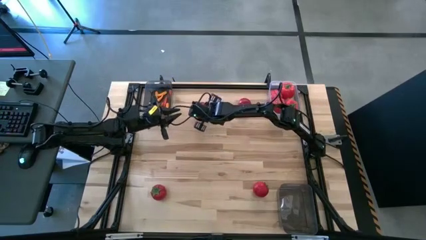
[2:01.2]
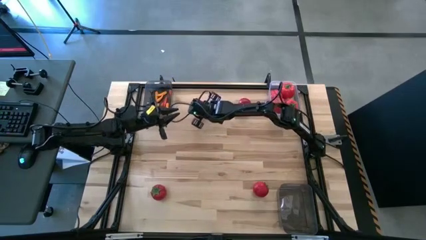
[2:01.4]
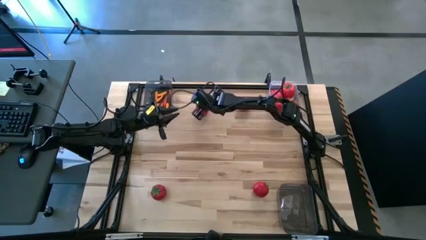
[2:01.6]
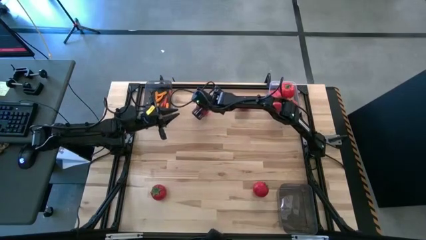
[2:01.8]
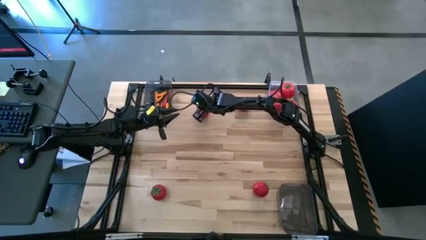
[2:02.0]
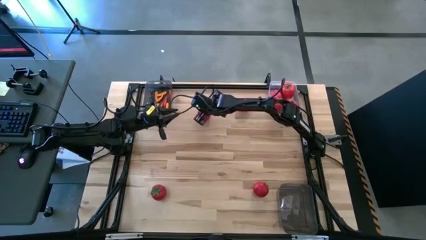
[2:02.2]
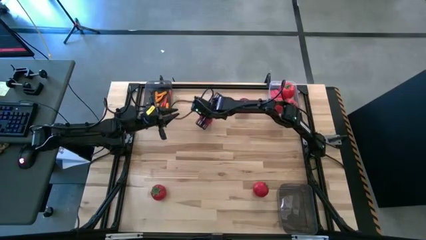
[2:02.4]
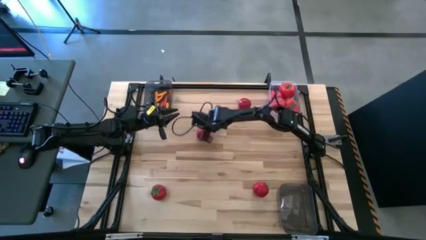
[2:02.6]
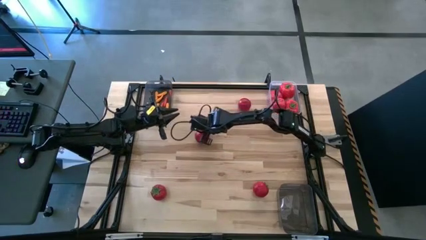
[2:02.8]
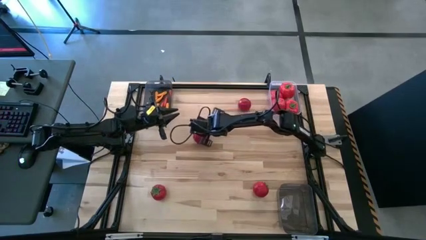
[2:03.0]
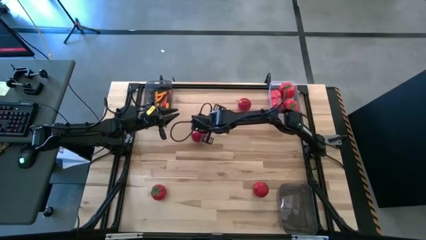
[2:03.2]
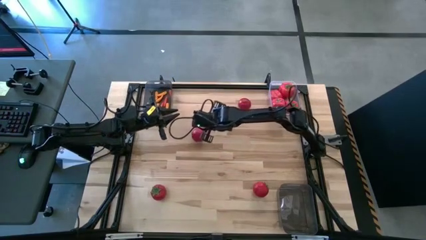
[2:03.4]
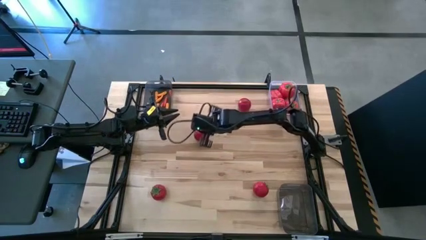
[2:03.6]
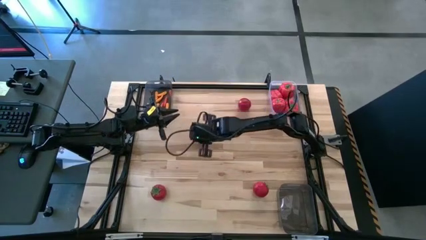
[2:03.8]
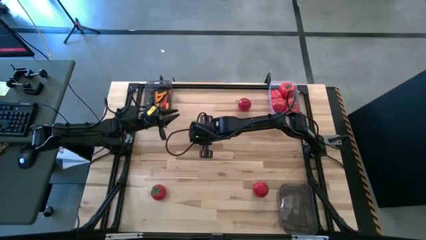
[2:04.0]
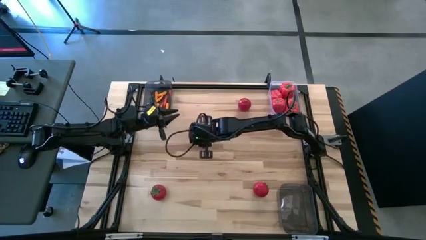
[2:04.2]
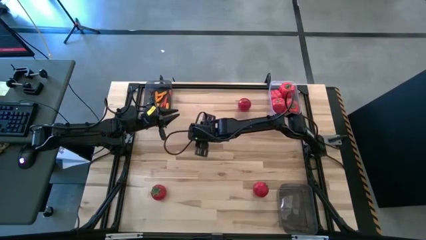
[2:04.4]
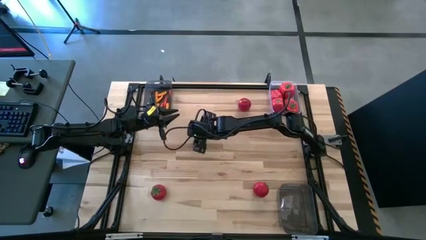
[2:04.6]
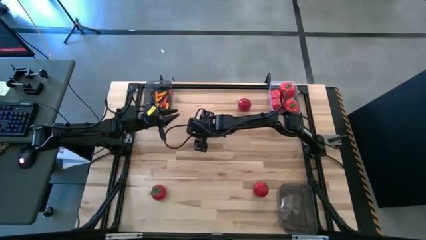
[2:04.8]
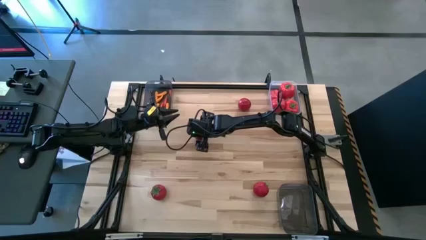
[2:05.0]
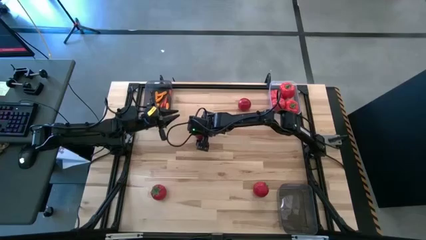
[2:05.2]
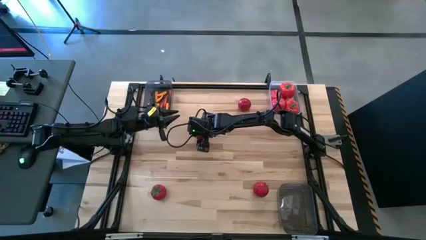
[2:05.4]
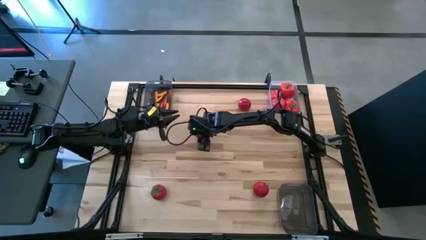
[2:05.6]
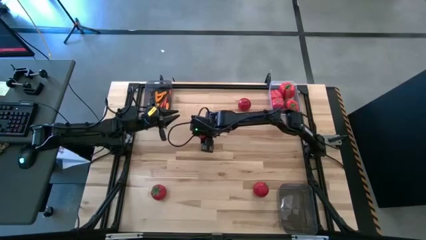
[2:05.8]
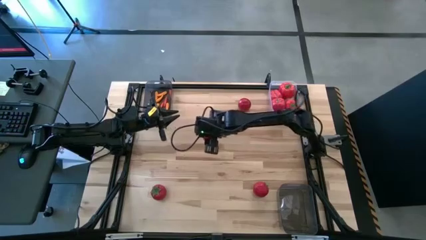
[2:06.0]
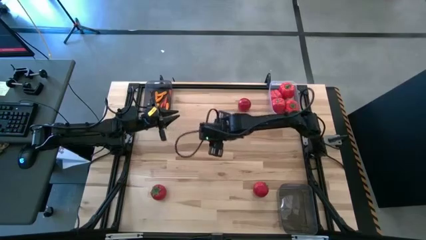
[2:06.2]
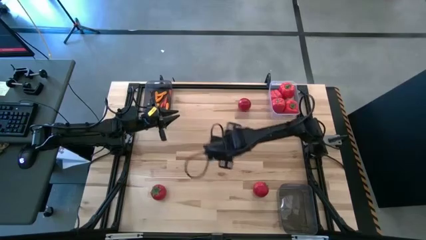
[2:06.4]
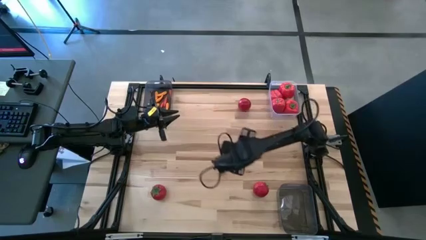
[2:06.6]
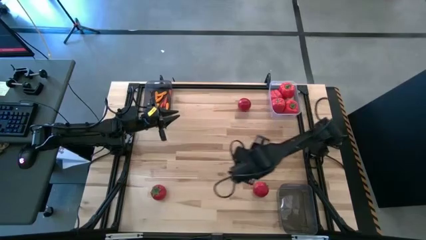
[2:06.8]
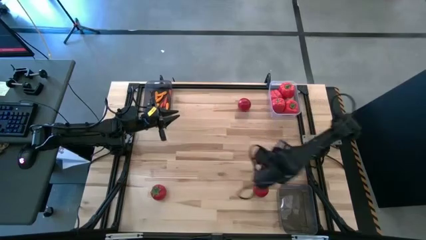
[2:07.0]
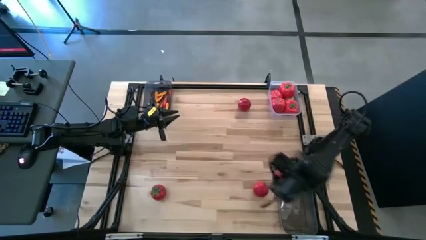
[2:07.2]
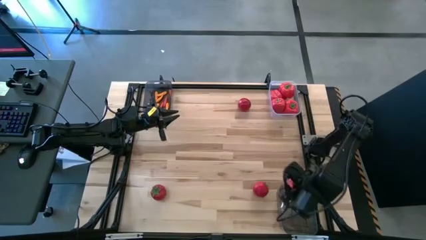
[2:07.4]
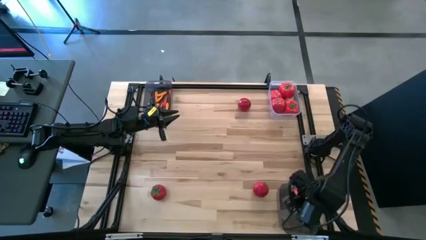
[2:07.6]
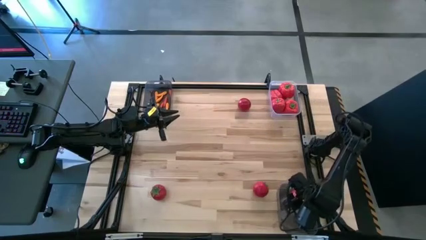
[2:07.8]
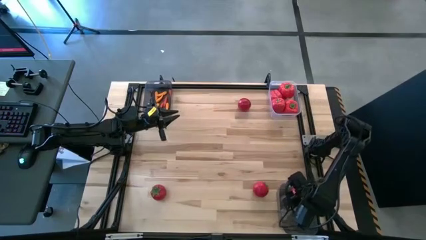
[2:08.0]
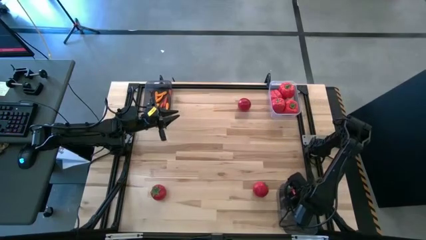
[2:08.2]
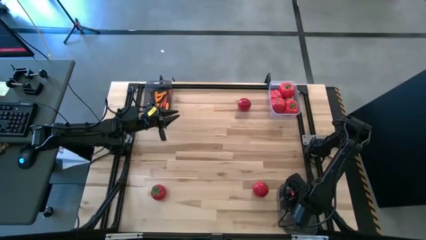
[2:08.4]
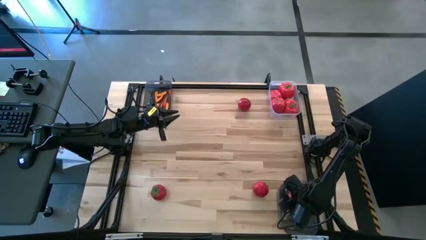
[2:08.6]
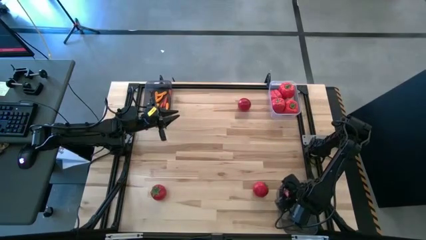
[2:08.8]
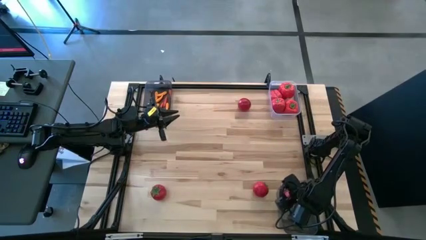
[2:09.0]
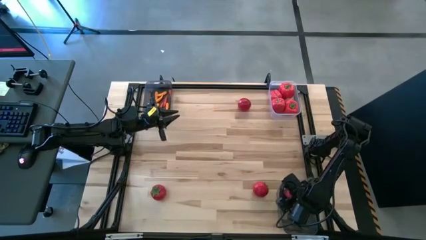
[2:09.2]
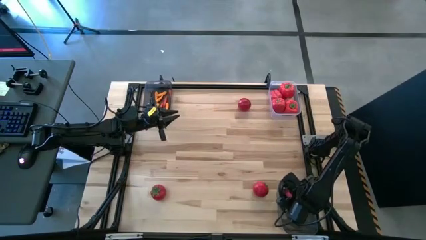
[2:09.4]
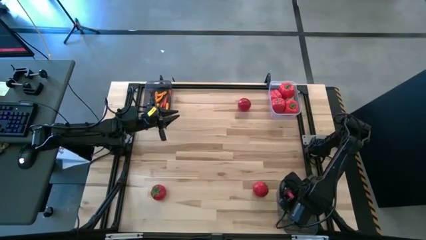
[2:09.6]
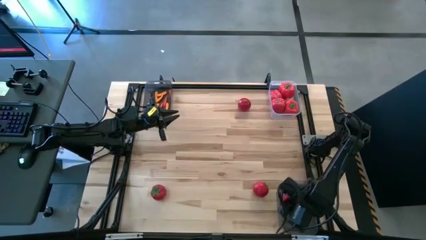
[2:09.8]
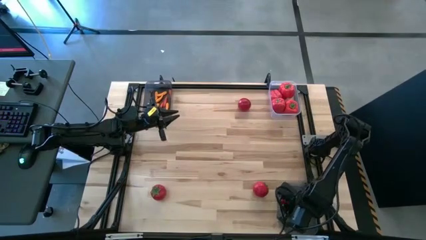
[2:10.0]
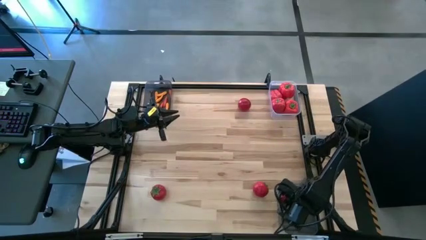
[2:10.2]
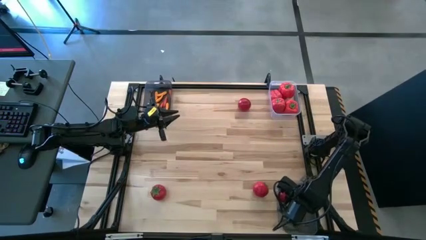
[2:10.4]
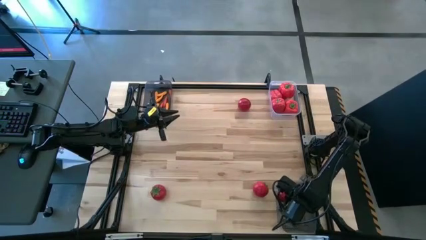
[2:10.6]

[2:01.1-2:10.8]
Task: Sort produce into baskets
Put the tomato into the bottom black bin

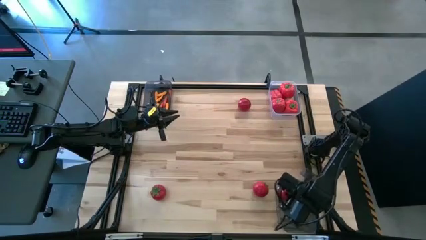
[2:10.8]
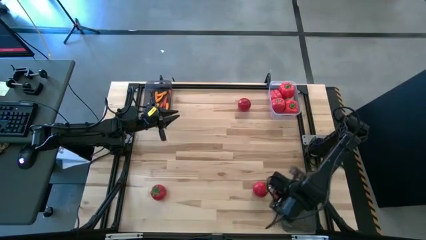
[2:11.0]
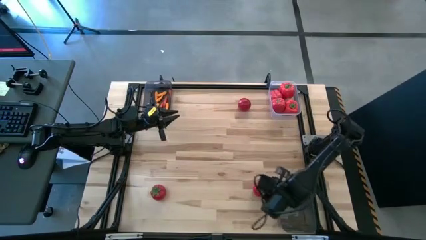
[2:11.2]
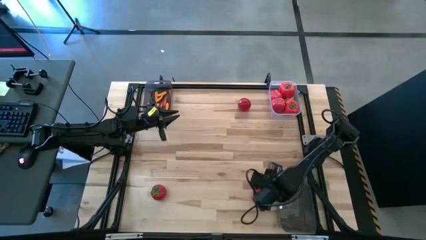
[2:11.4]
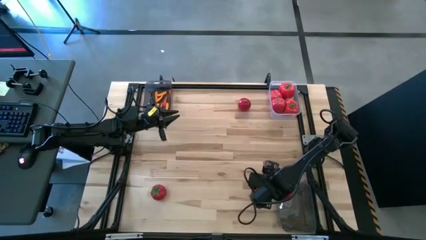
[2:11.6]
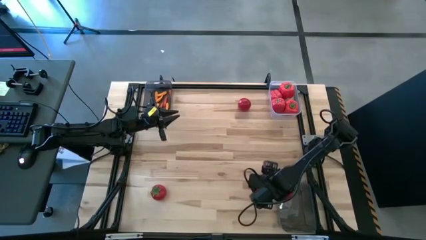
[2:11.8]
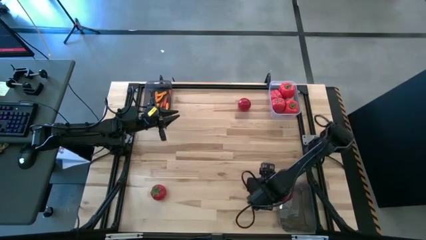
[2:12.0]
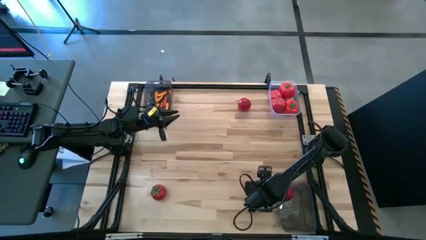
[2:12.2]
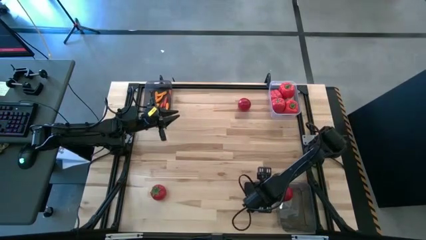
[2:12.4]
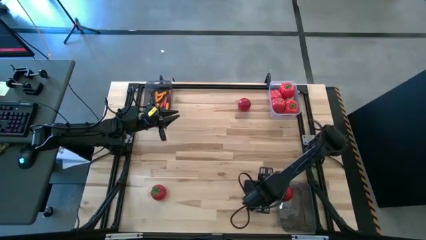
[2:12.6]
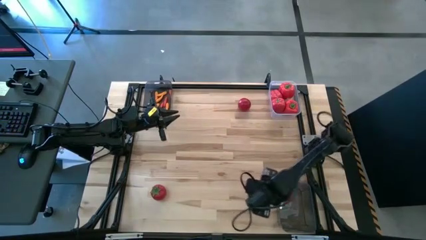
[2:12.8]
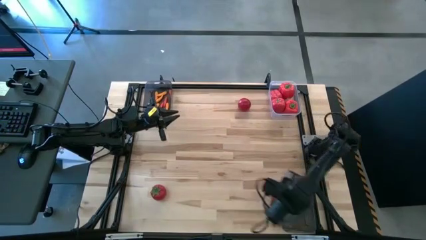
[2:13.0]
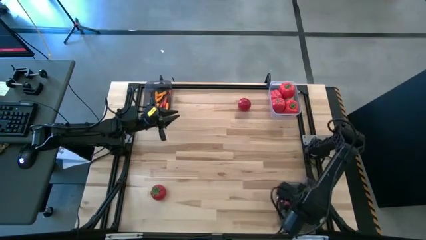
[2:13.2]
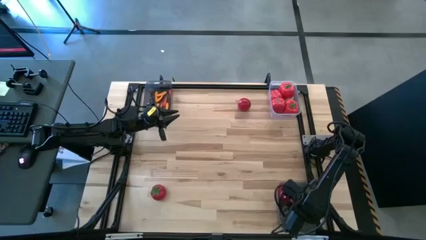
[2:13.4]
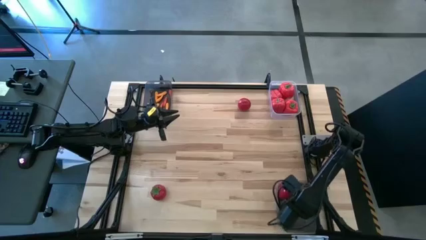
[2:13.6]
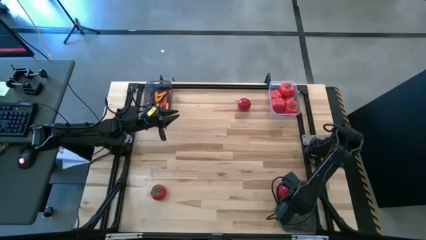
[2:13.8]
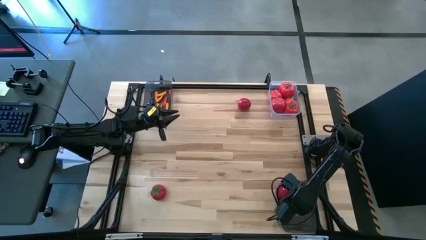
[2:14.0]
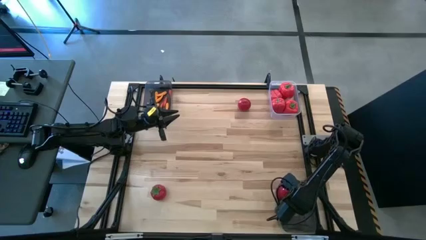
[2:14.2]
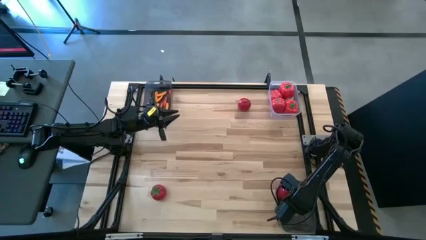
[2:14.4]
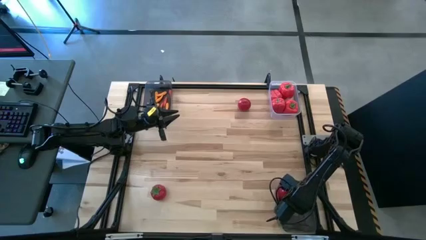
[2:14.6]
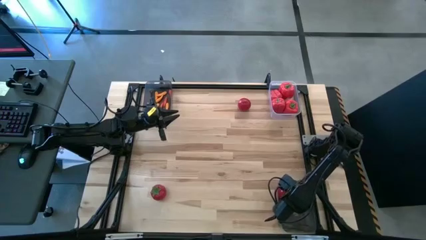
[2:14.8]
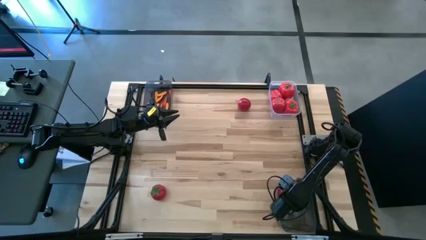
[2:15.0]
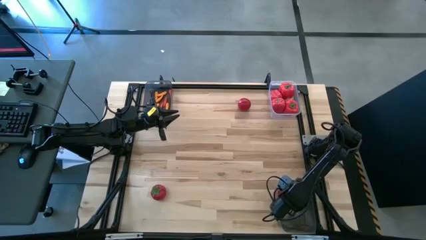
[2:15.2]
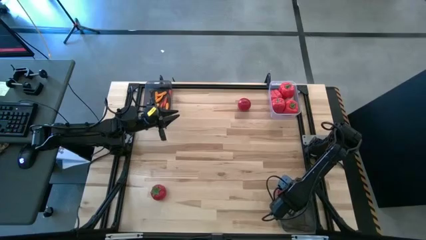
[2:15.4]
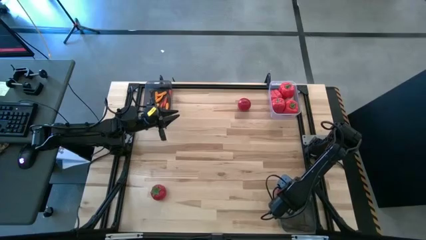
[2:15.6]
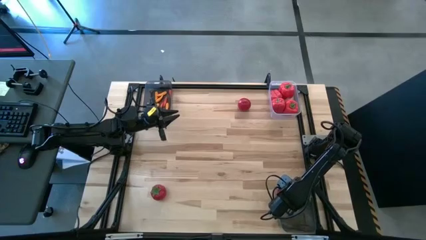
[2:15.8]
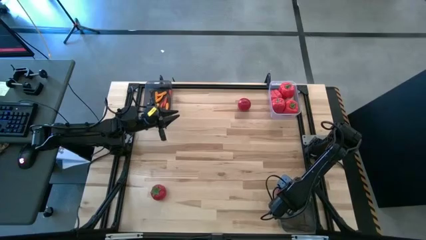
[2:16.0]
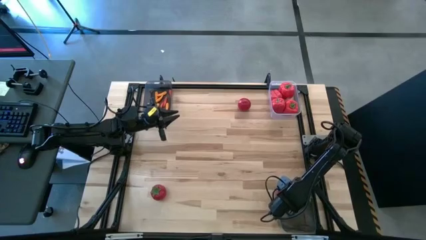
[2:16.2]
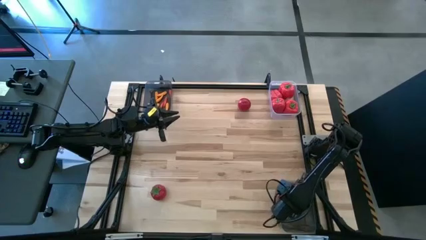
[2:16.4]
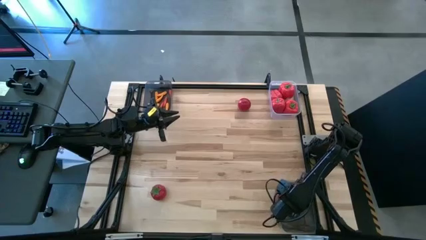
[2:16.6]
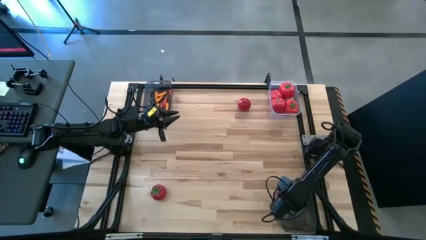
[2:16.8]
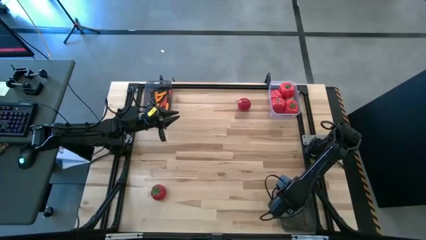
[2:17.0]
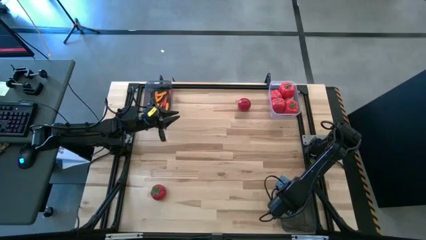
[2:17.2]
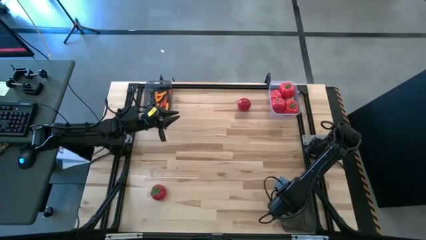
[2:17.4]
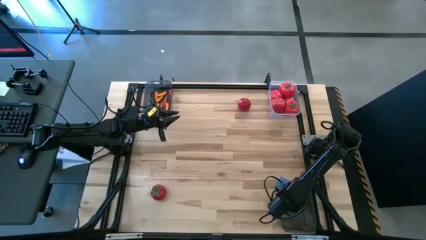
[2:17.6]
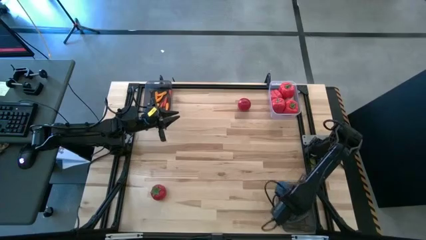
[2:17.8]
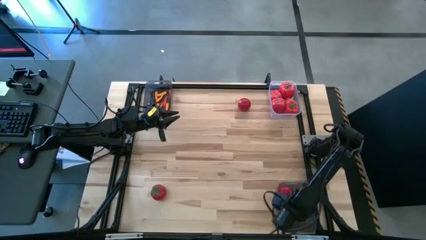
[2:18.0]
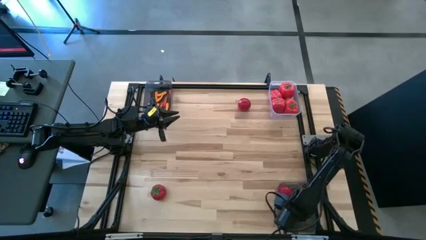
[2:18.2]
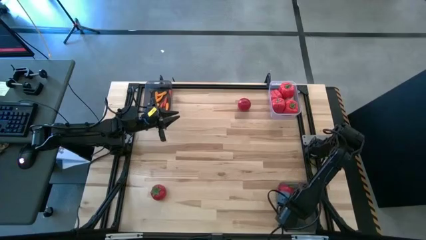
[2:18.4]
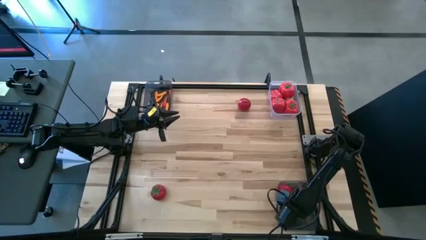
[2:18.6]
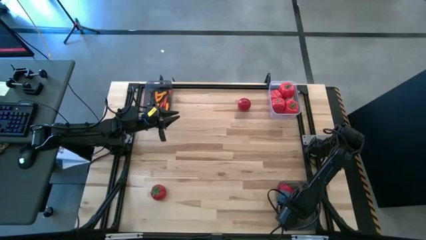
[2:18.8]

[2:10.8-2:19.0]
Put the tomato into the bottom black bin
